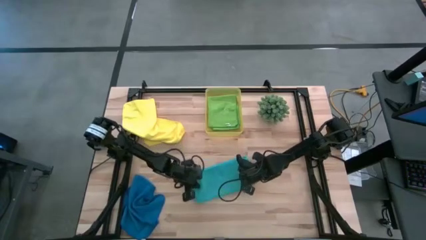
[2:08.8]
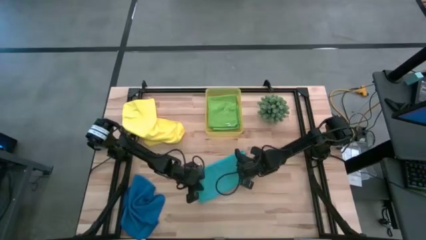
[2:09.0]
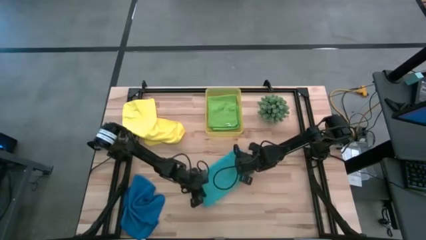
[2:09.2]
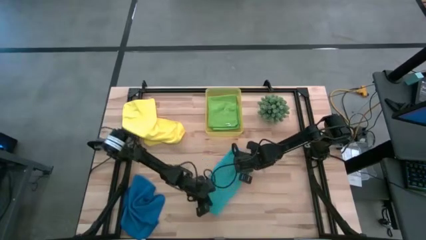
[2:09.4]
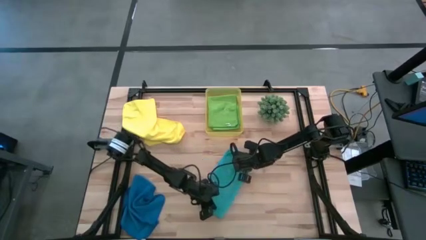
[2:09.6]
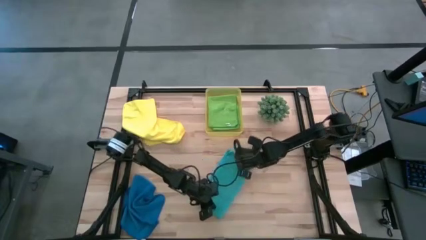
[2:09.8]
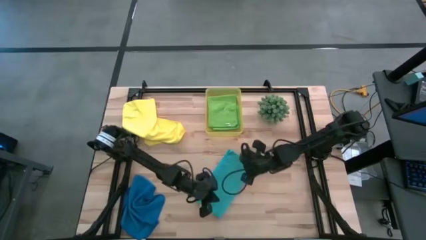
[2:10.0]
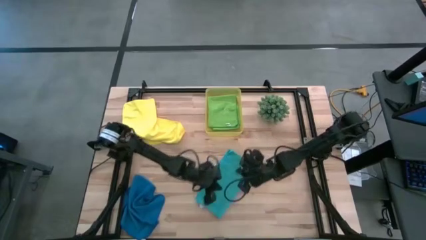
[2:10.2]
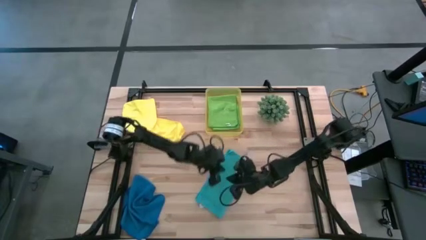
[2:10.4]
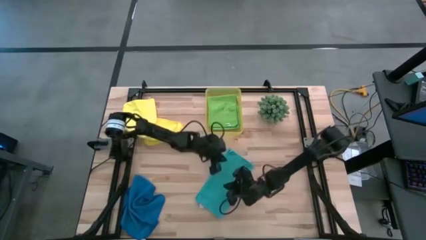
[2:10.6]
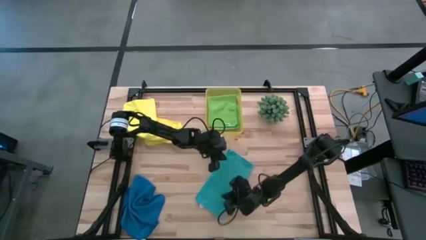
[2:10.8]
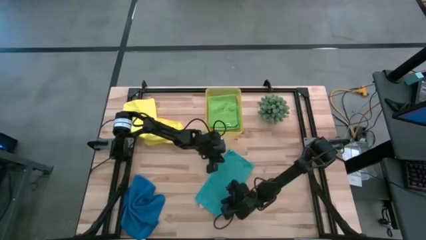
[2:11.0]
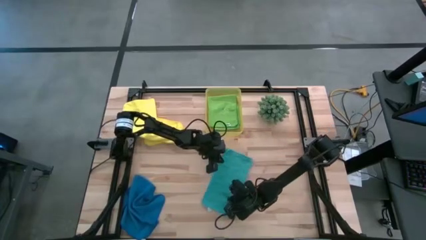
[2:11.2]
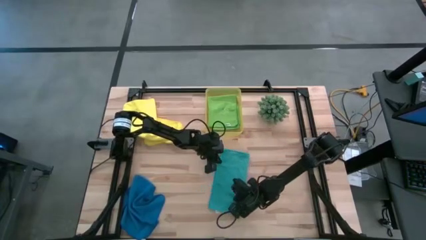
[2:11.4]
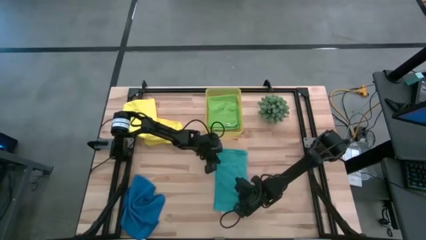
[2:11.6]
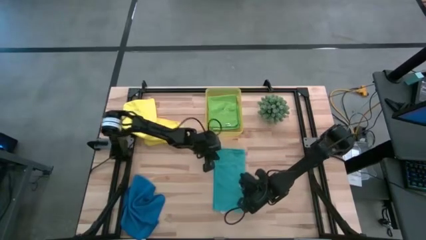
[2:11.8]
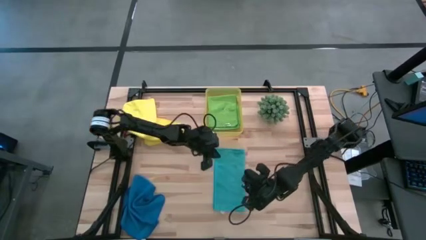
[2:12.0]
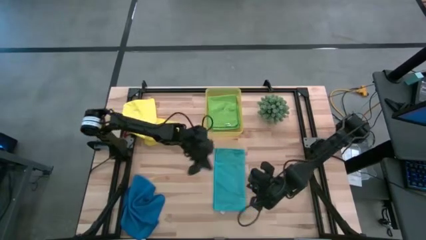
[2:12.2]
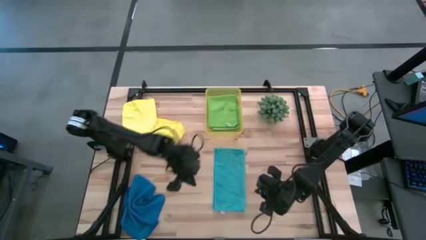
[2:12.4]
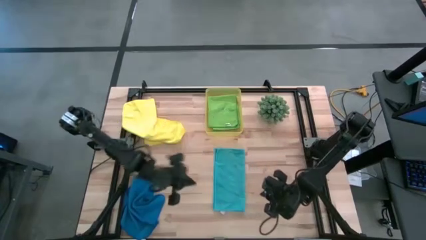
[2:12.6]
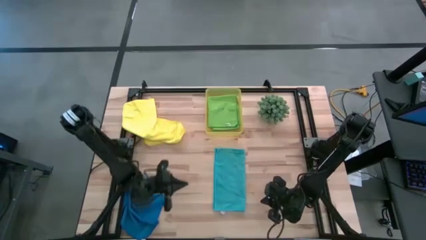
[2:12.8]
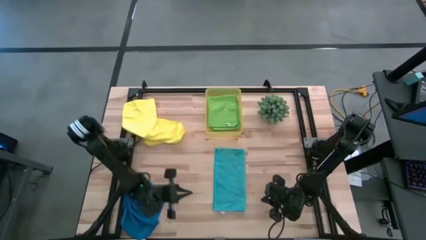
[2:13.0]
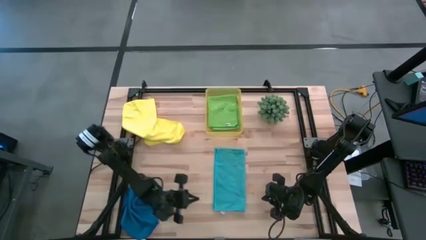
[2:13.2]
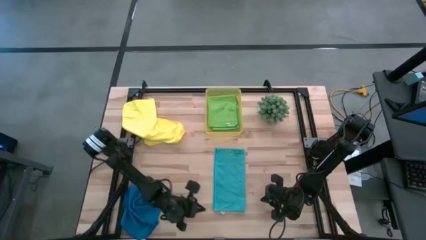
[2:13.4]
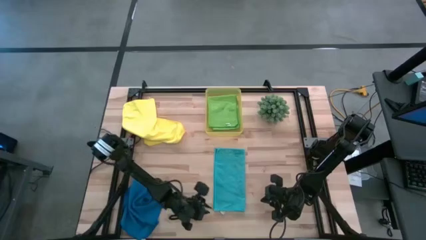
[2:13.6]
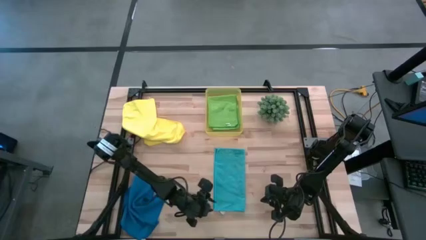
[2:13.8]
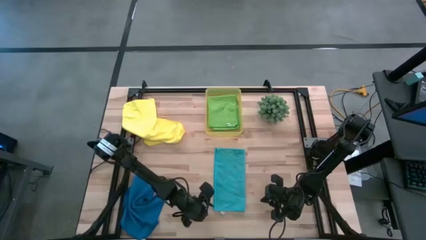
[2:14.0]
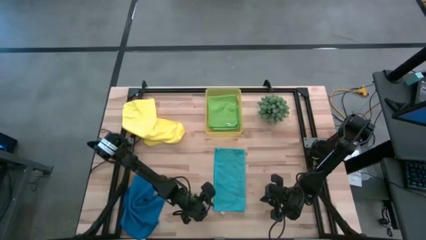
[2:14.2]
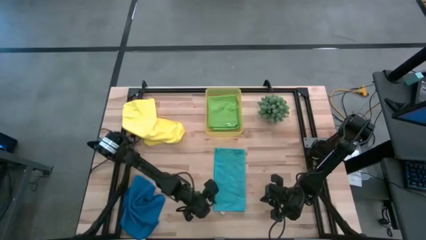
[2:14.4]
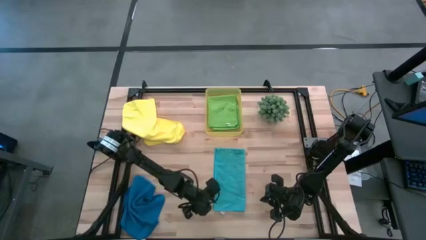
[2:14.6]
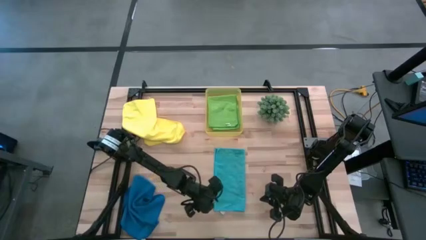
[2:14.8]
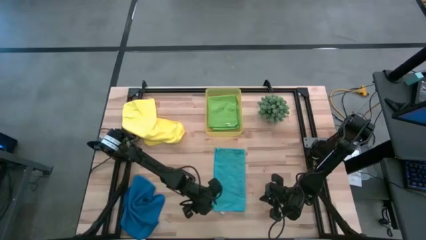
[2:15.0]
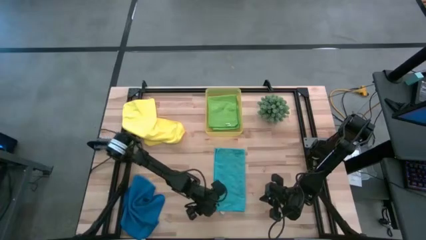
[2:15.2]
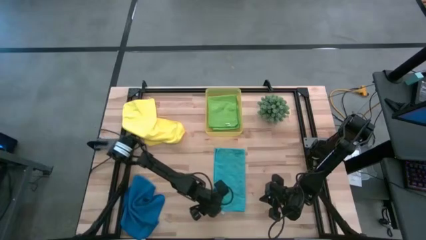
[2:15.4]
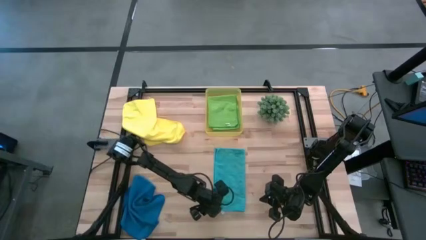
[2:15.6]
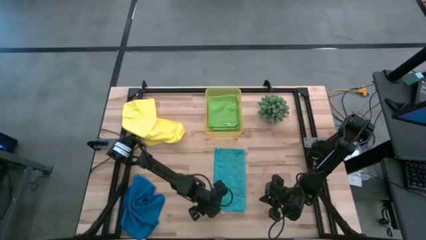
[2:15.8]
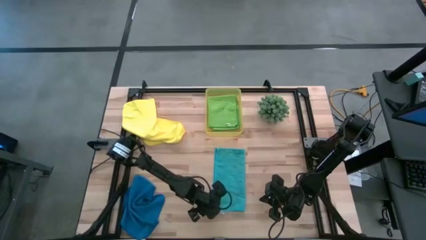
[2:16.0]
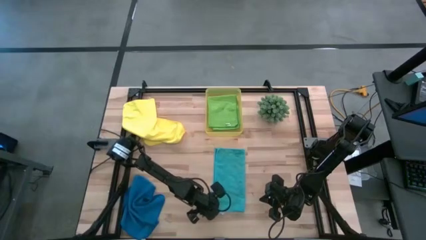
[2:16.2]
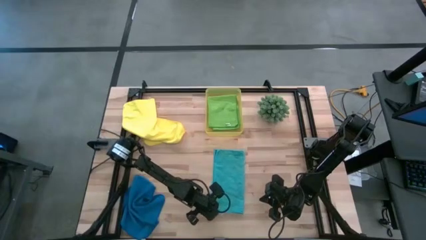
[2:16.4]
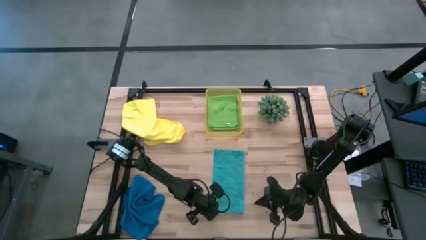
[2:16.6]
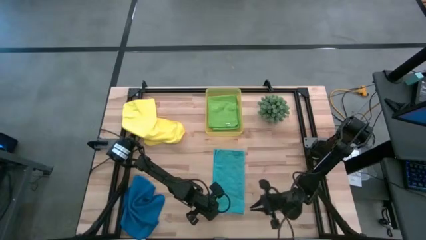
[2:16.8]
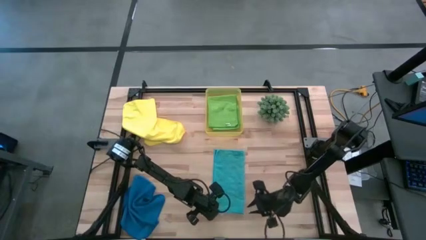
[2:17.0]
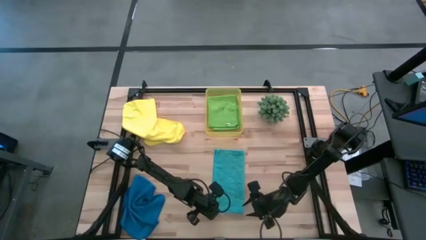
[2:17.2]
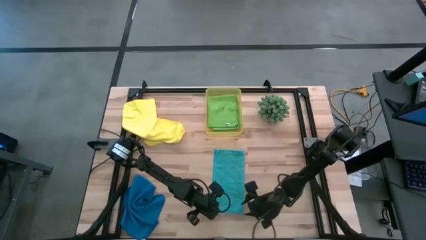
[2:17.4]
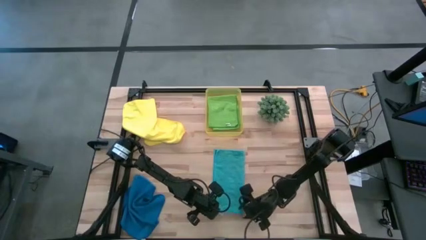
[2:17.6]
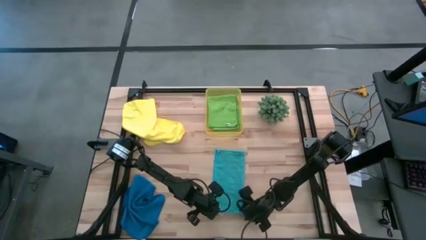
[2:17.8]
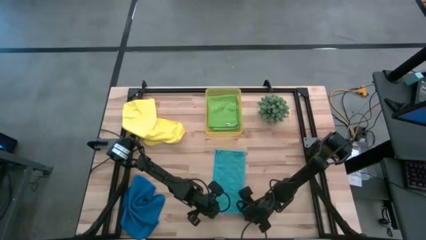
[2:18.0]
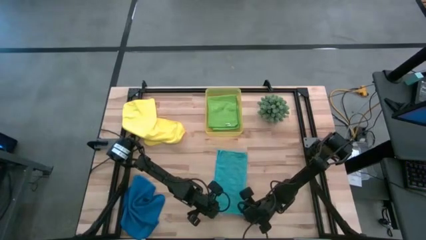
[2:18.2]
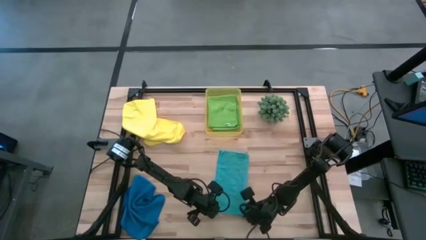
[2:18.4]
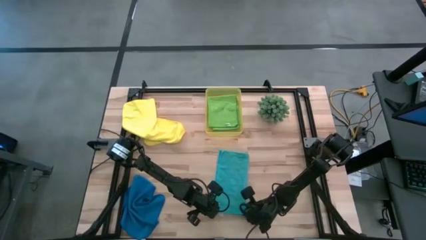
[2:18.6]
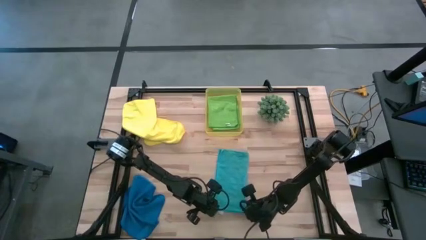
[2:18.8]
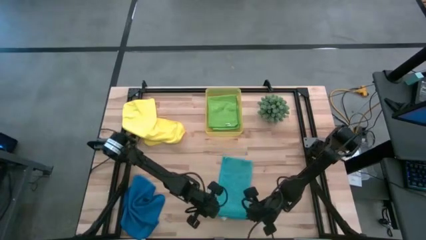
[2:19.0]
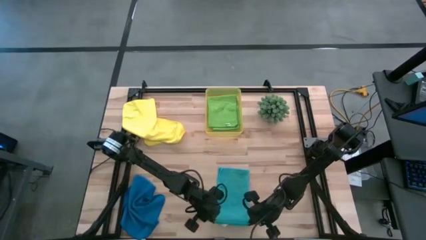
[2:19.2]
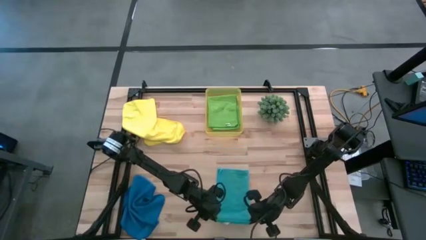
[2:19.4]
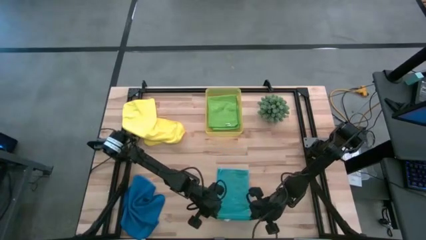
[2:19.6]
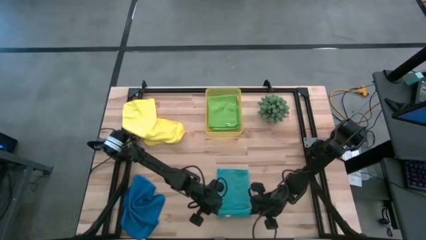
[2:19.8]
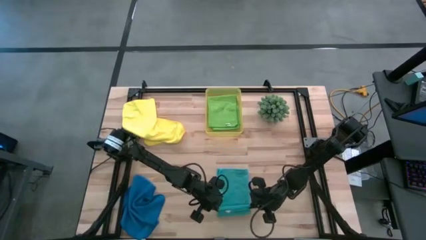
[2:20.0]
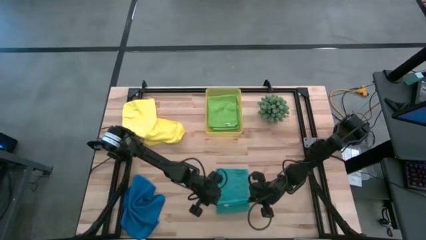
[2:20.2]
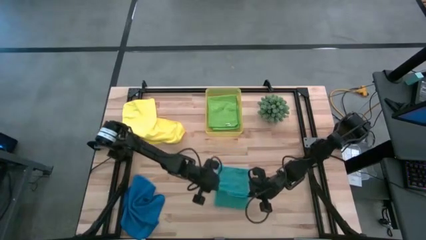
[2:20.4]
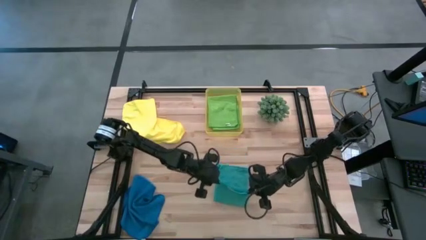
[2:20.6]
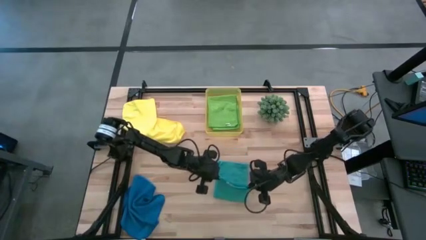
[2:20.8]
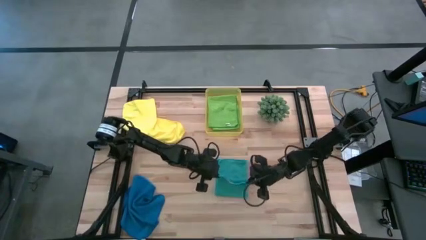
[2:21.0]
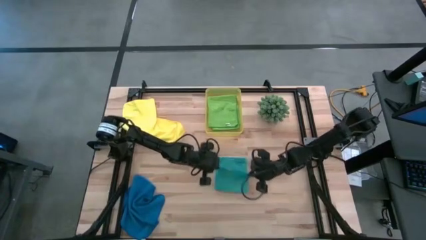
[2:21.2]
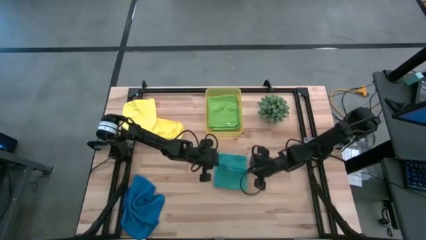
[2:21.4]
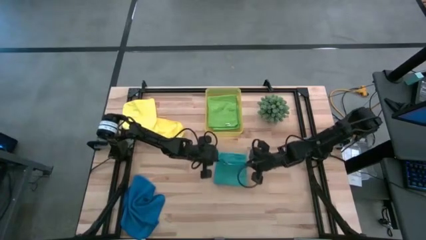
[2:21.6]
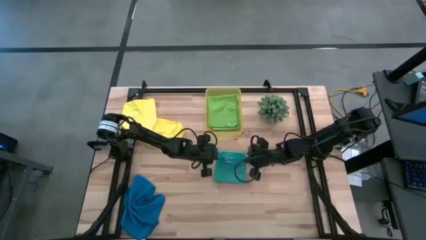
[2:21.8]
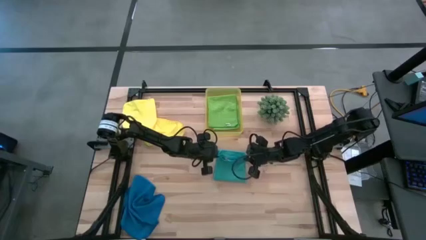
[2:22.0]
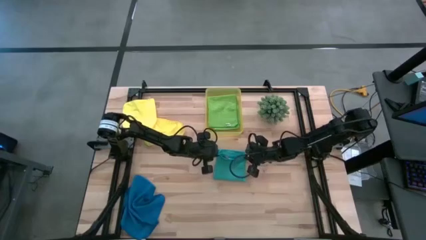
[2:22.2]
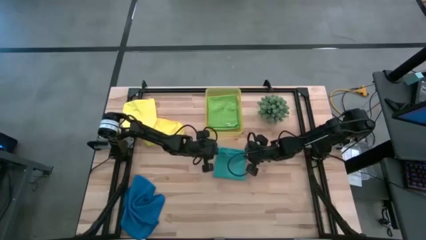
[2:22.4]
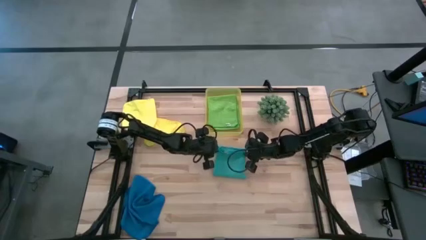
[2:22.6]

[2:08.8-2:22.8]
Task: Fold microfiber towels
Fold the light blue microfiber cloth

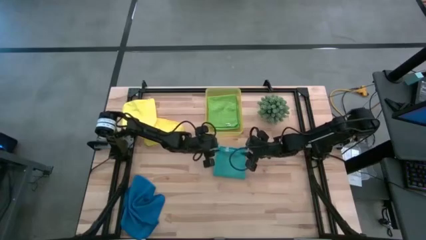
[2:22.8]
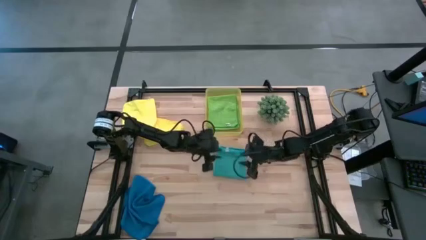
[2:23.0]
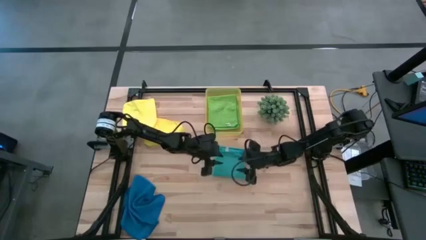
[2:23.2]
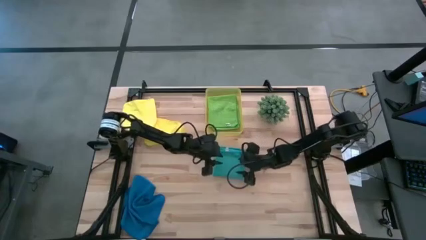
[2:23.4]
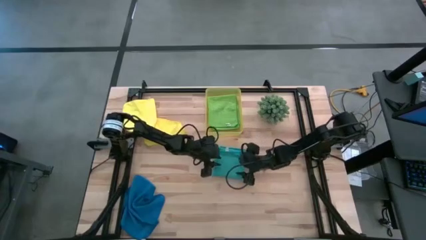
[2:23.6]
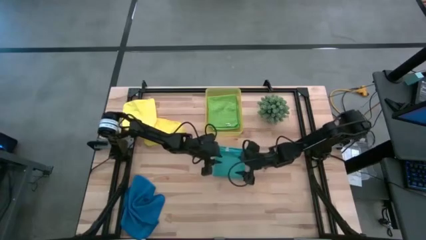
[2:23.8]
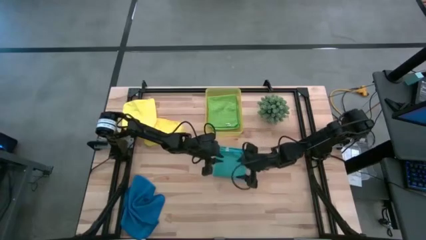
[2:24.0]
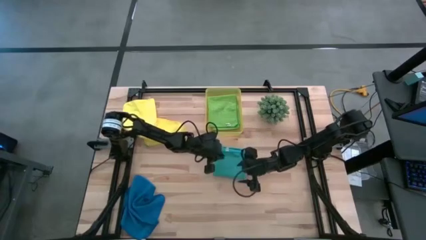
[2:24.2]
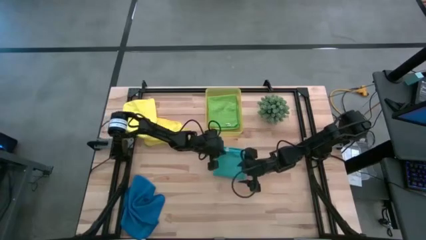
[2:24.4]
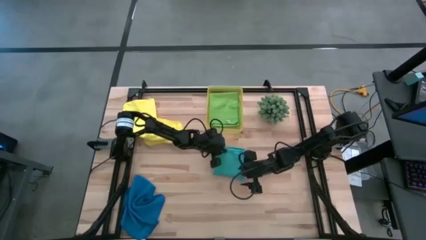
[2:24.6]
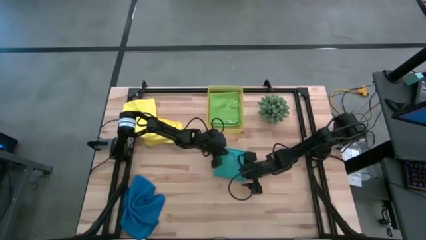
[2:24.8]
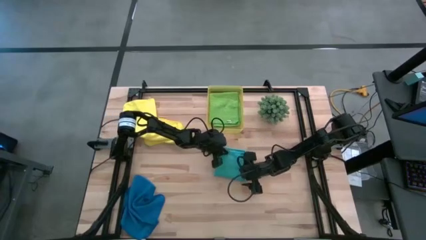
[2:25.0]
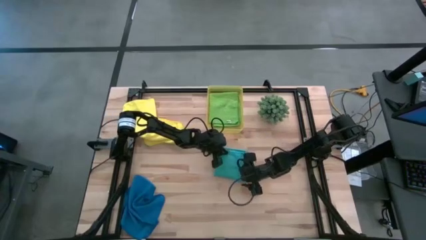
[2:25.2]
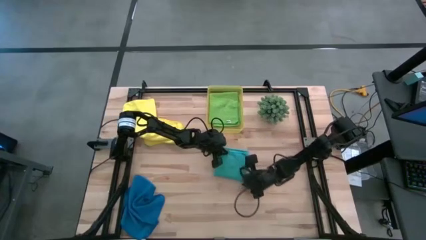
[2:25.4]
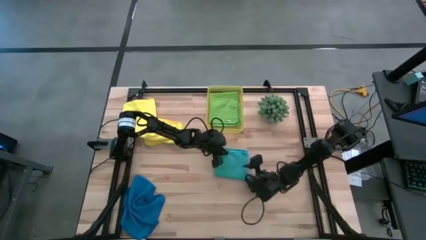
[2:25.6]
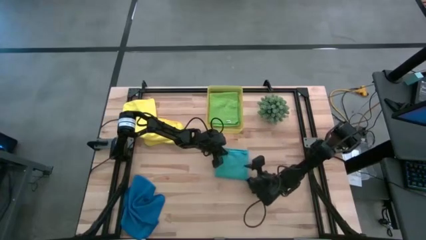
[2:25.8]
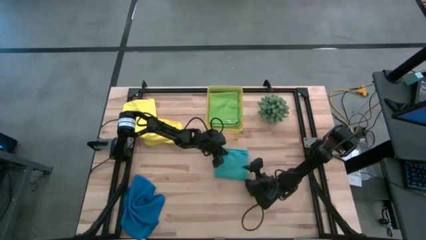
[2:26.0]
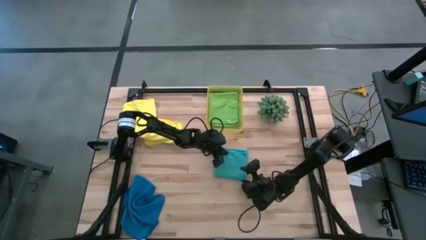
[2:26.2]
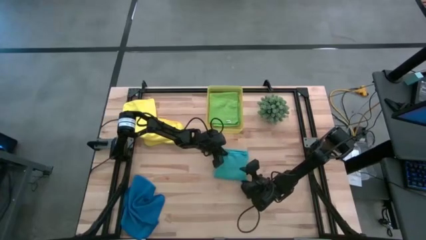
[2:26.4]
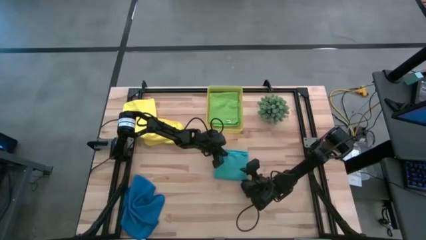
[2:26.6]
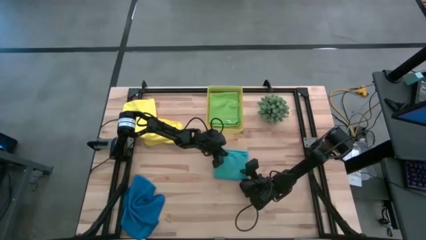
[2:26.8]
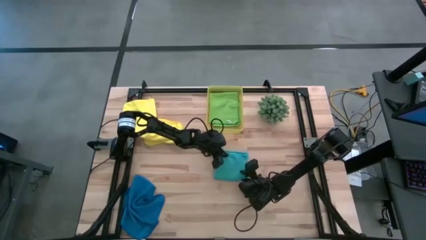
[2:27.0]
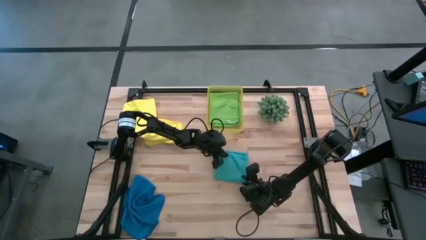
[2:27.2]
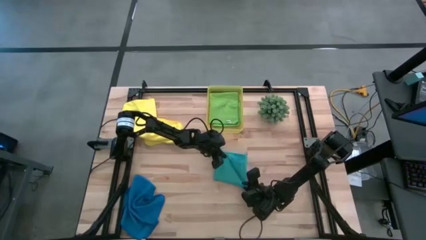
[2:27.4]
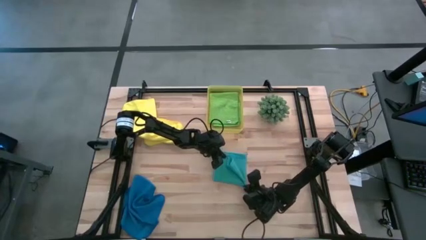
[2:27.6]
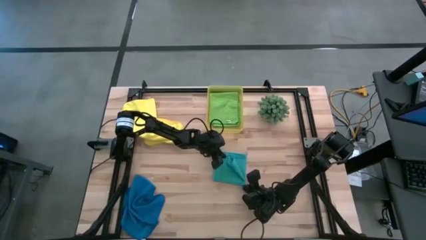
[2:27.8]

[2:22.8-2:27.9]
Put the light blue microfiber cloth into the yellow bin
